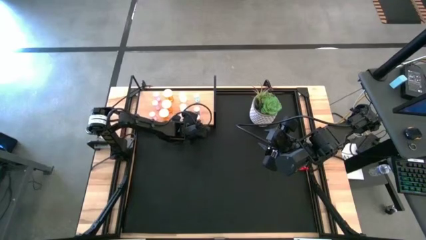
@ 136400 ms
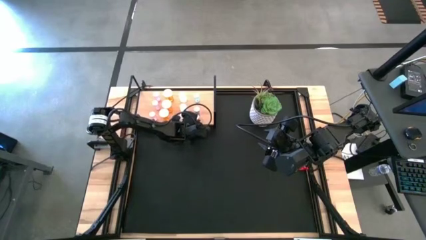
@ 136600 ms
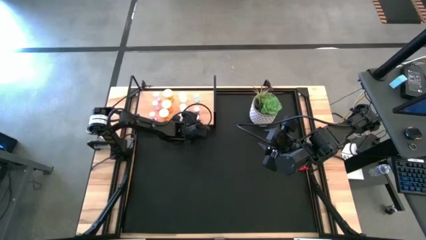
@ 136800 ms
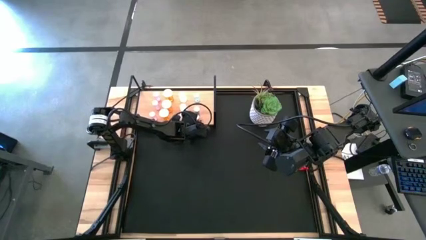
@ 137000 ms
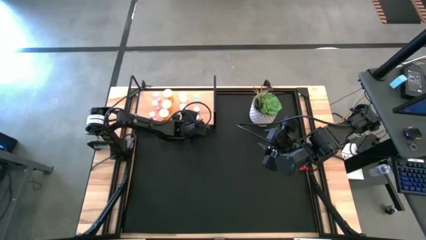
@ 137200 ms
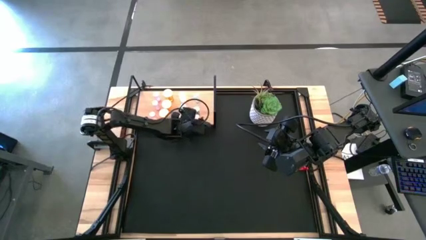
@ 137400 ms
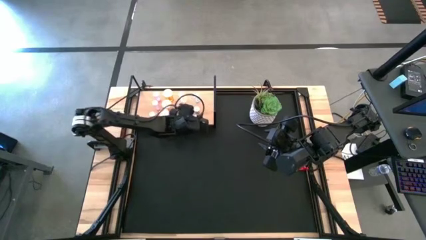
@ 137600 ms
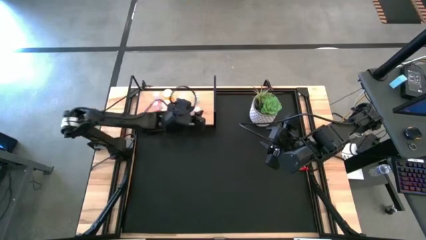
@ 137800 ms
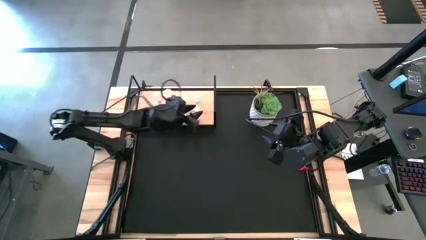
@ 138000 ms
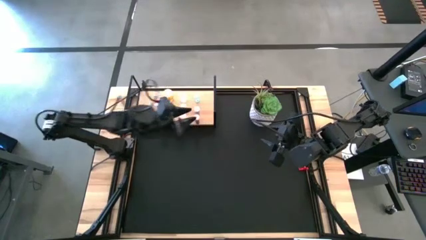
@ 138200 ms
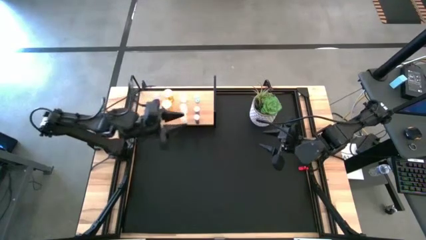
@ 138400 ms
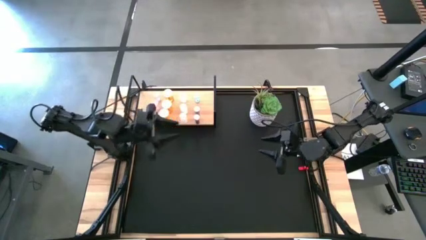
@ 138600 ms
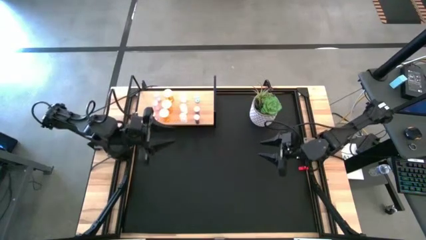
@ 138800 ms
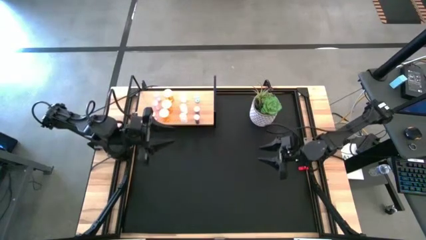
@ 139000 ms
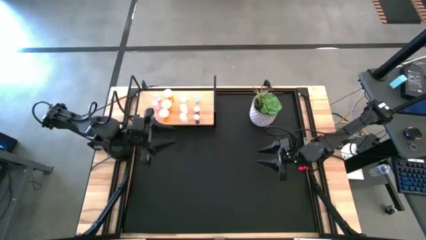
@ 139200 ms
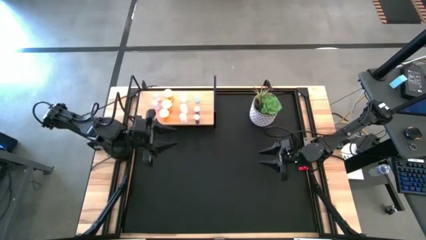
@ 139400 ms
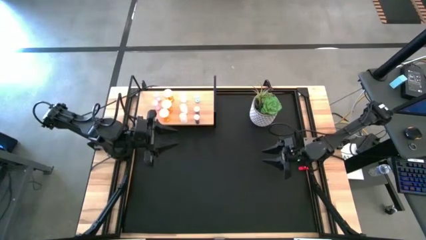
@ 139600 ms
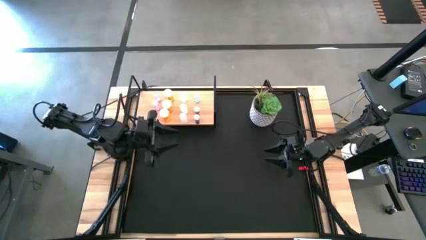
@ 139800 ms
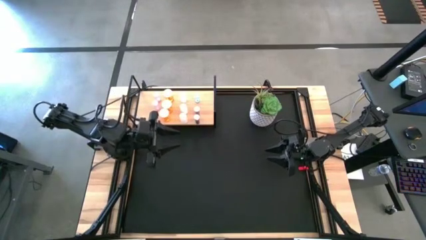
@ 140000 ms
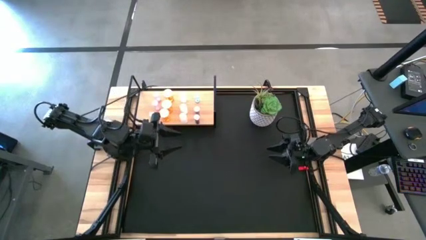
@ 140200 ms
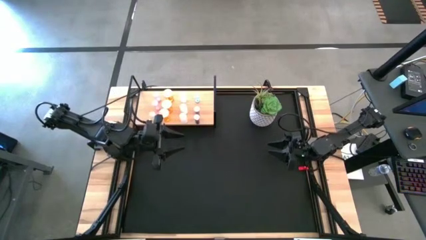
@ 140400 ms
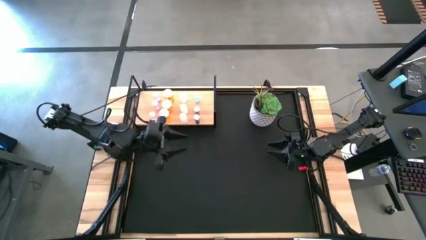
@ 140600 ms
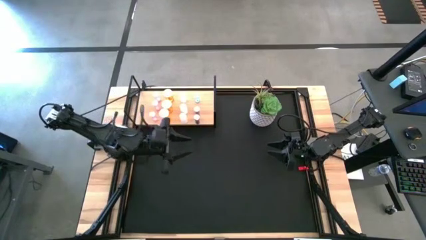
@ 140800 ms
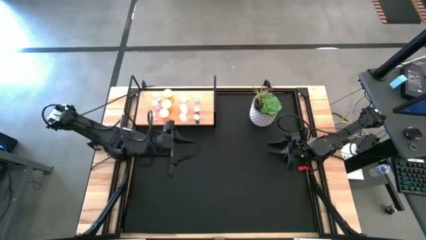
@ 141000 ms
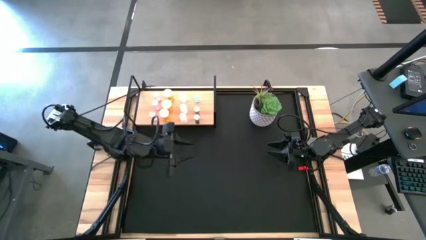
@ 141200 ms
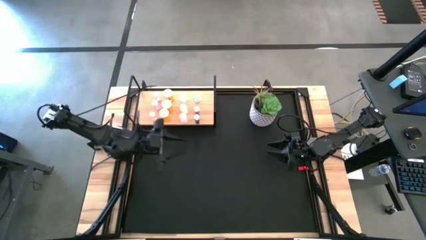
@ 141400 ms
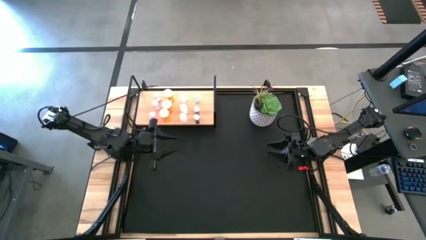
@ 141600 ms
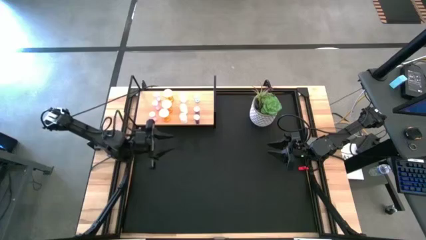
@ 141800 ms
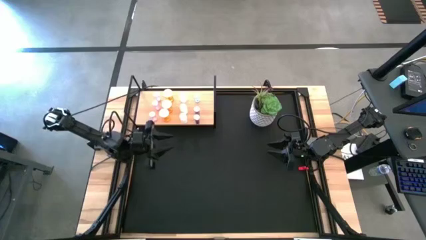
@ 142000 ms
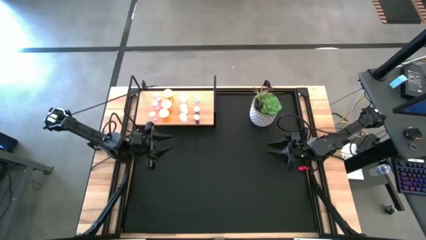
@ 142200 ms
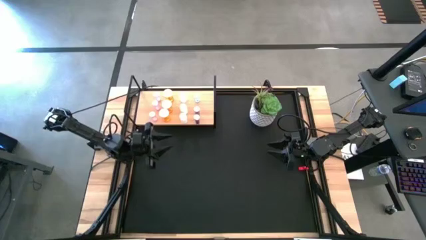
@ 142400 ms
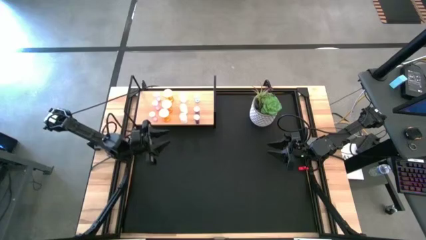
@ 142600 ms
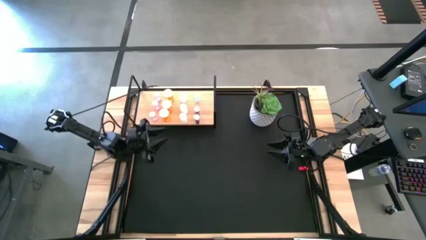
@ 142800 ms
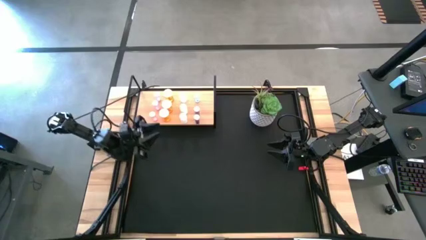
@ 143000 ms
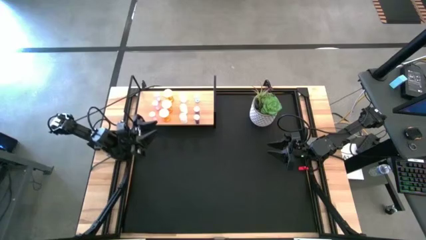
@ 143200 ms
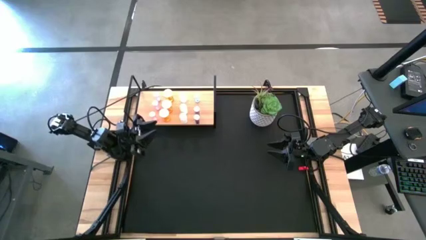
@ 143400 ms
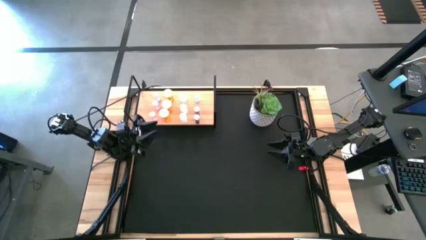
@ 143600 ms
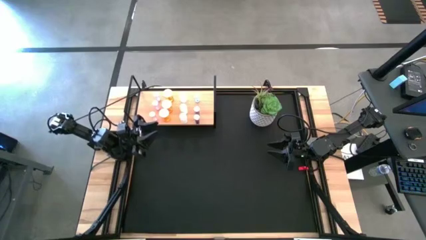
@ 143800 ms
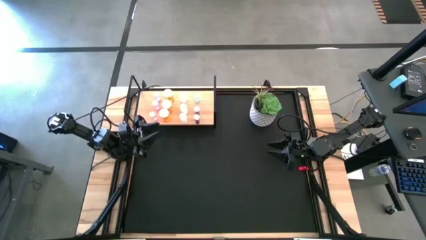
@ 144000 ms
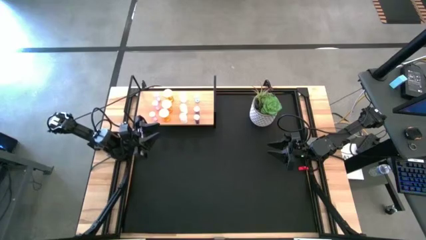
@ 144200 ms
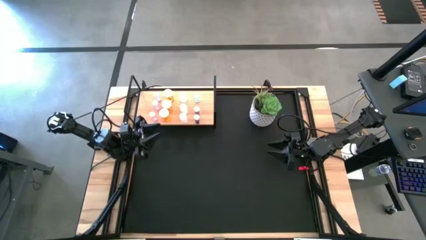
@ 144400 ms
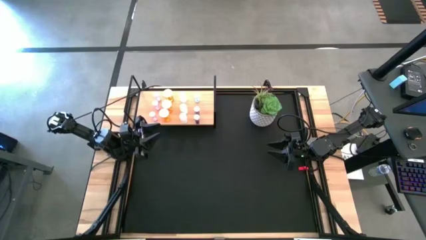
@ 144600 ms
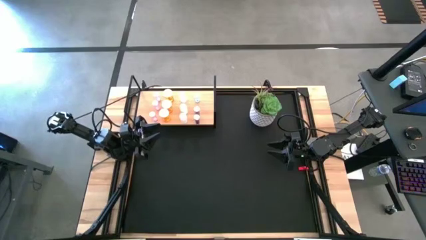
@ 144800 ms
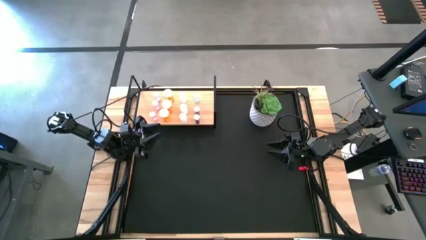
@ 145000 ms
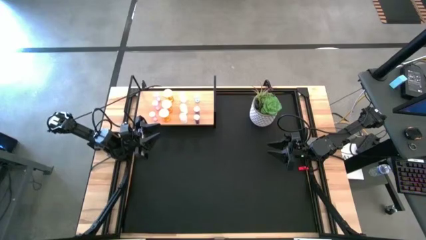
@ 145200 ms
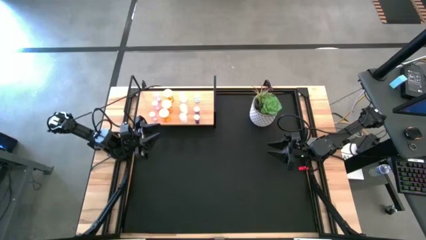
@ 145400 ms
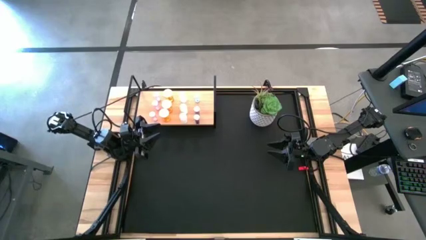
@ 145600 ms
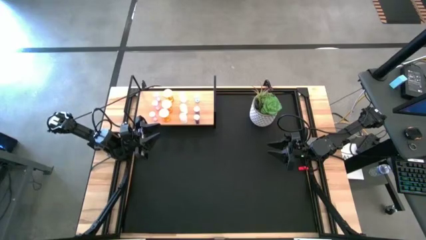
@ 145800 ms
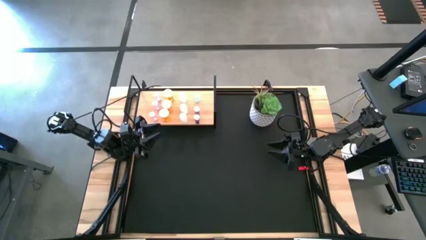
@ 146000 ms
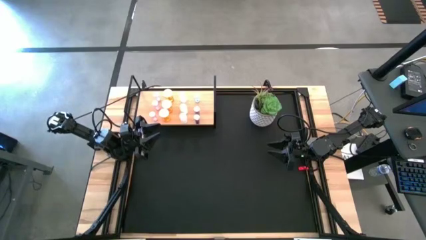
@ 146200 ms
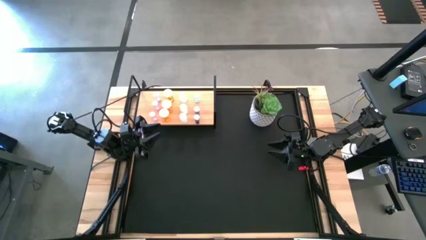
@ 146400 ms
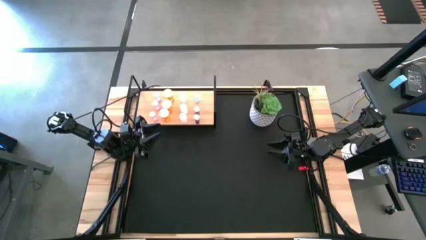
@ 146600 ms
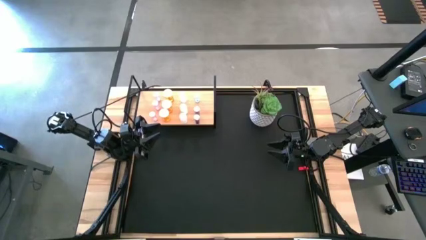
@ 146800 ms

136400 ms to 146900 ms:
Task: Pick and place medicine bottles onto shelf by color
Return to Home Position

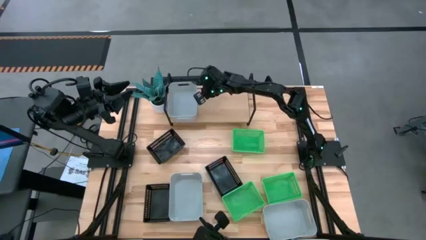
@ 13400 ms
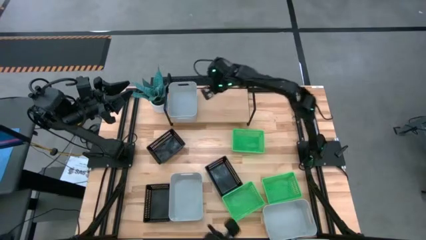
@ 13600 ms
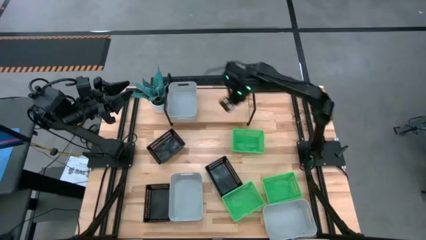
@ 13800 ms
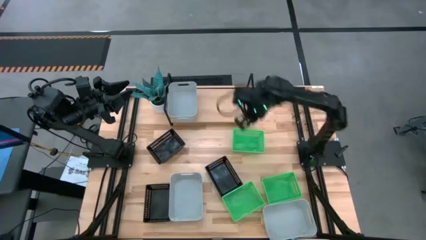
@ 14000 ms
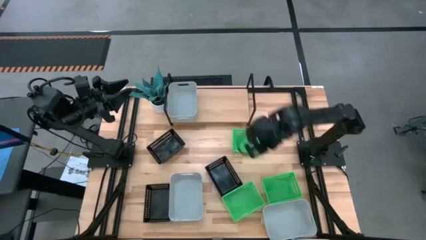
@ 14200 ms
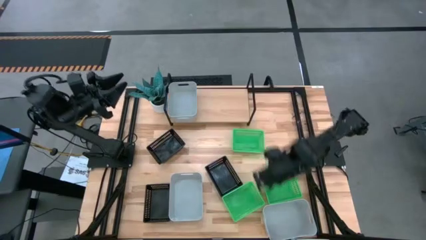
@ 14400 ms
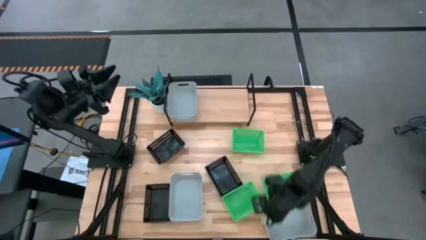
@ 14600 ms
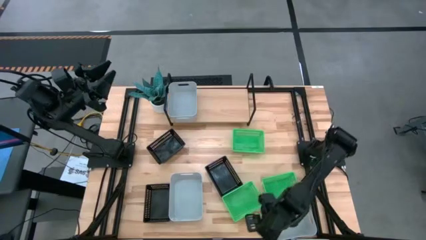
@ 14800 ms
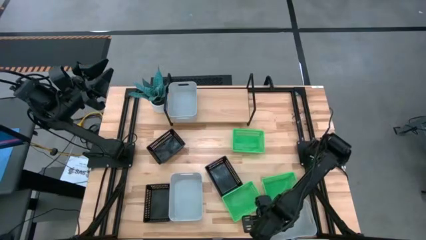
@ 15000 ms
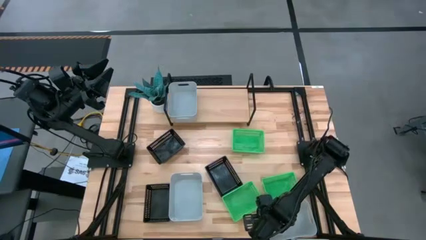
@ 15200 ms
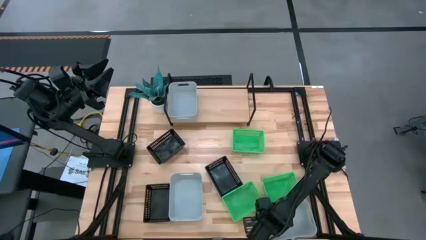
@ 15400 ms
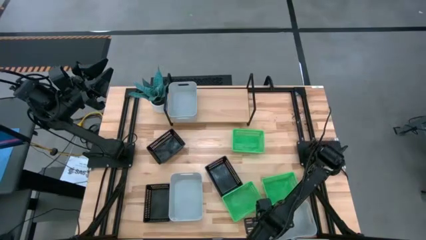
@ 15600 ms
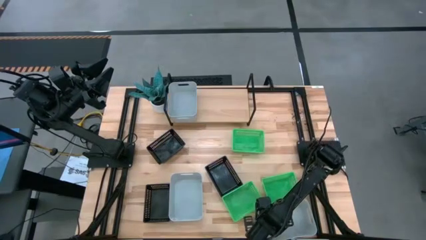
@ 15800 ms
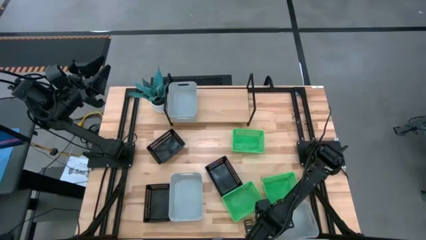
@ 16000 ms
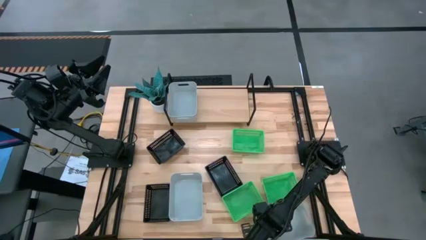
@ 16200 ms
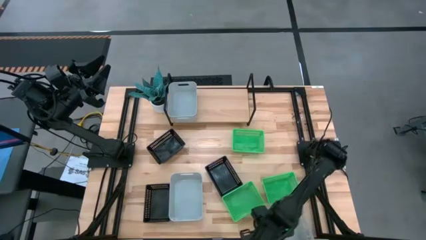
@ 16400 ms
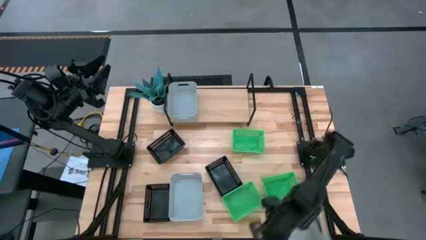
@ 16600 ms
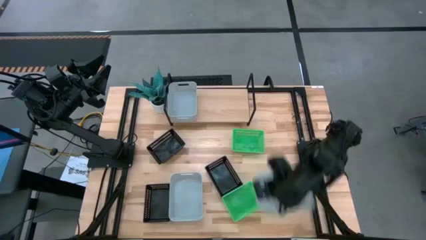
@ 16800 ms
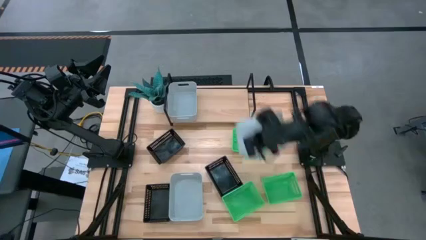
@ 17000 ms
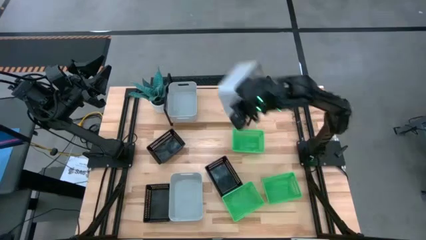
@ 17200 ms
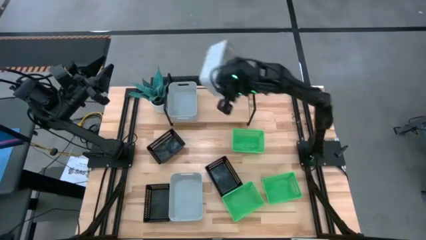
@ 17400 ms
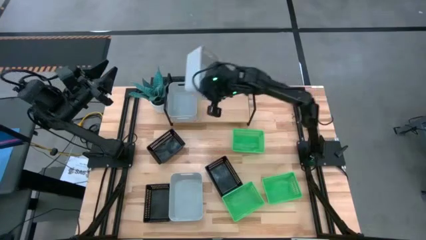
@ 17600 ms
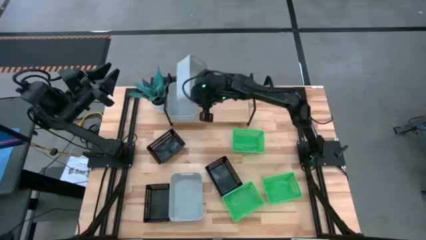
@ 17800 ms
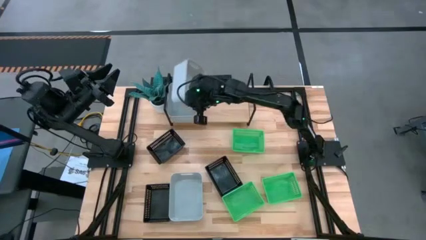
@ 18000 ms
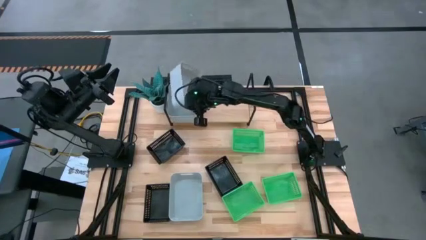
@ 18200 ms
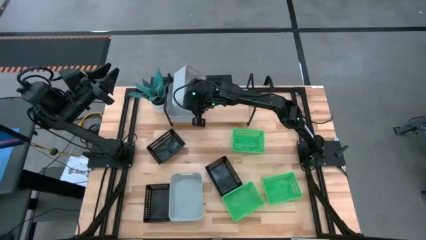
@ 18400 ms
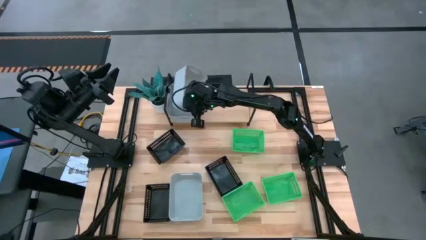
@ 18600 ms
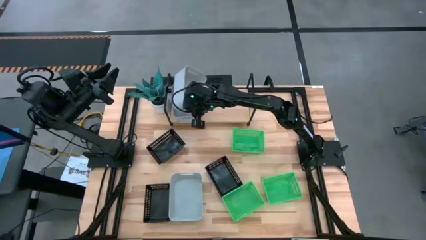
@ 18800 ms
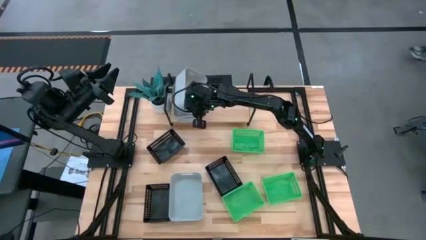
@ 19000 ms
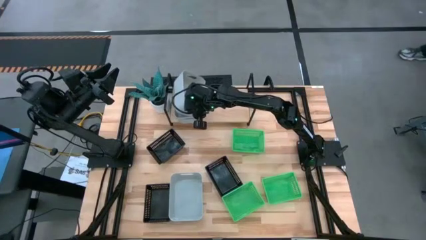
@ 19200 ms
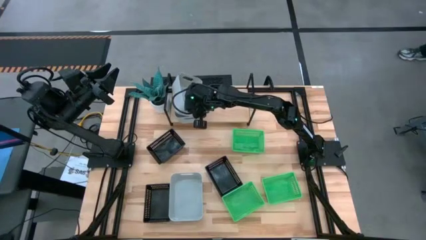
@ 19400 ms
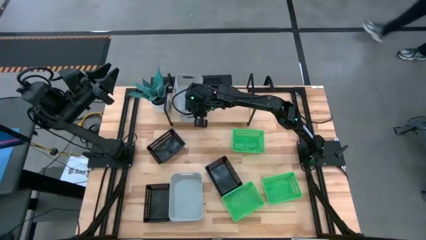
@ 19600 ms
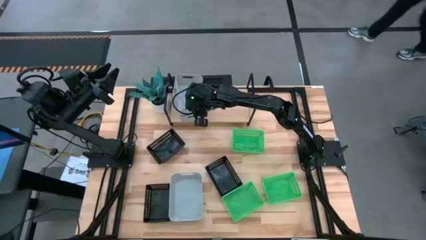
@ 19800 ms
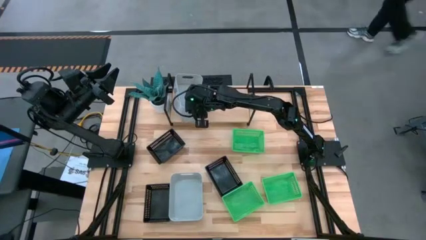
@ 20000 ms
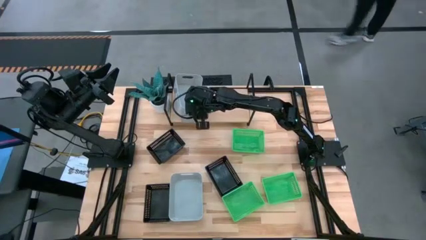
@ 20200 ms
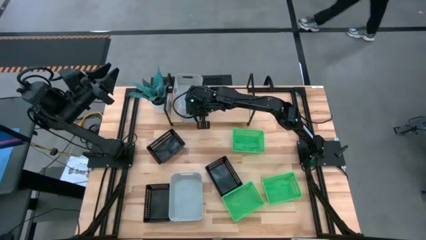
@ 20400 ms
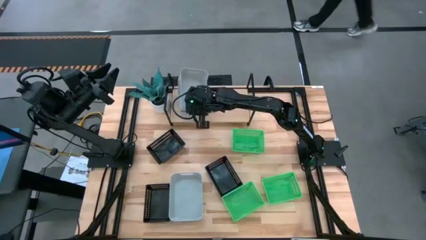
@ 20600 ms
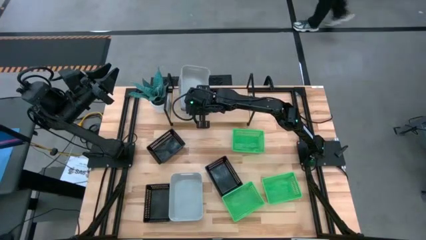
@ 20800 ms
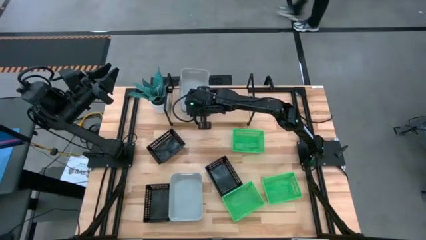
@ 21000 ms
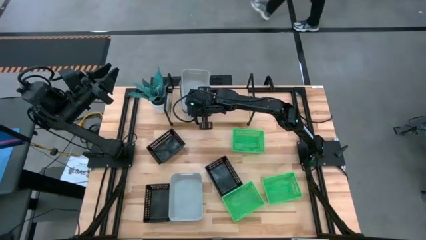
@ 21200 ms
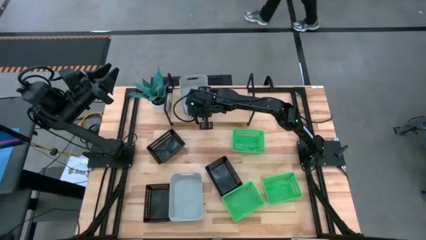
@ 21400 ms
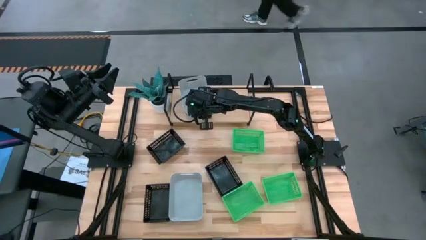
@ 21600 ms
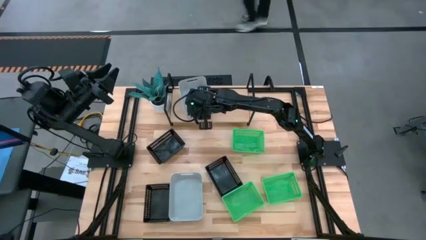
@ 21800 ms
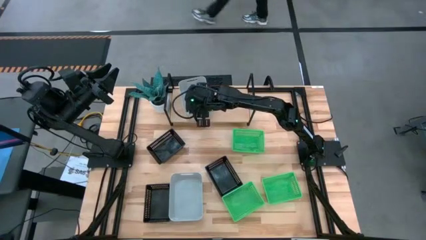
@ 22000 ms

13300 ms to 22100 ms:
Task: Stack baskets on shelf by color
Stack the right gray bin on the gray bin on the shelf
